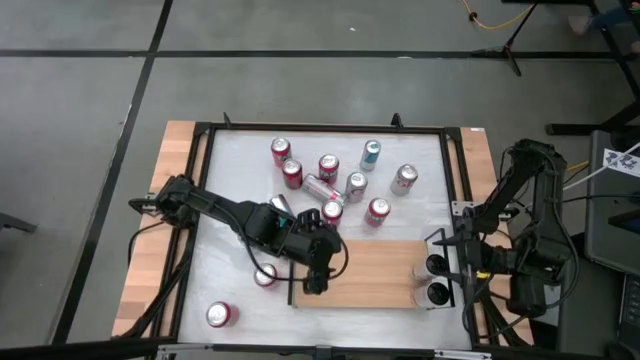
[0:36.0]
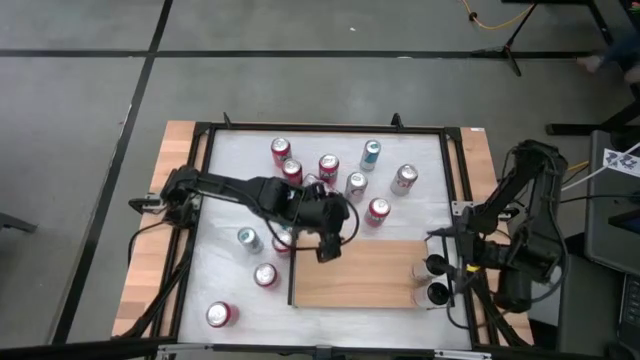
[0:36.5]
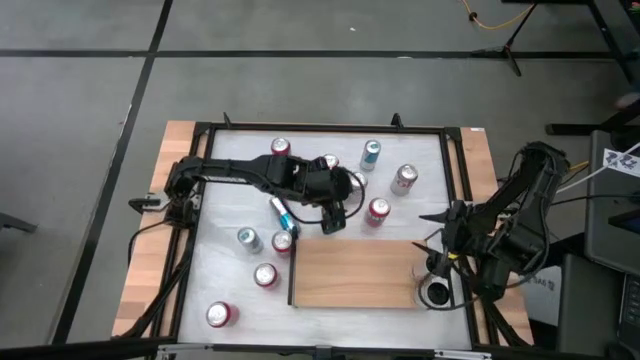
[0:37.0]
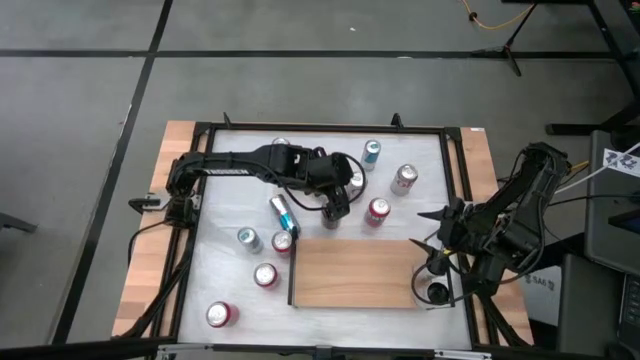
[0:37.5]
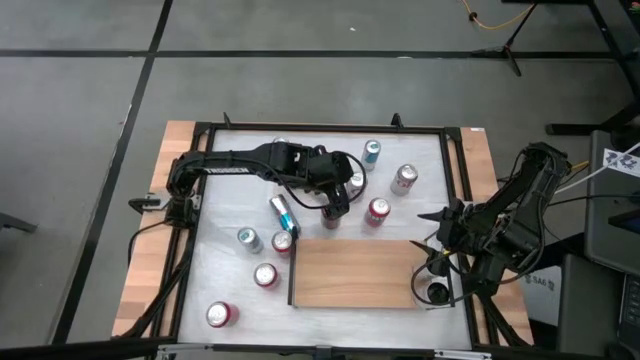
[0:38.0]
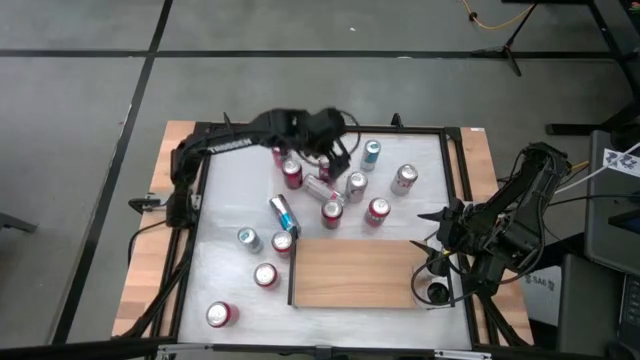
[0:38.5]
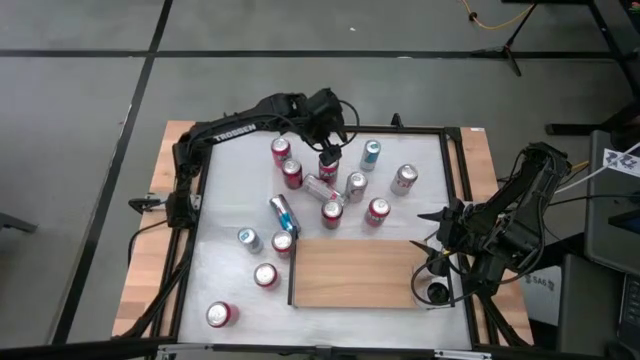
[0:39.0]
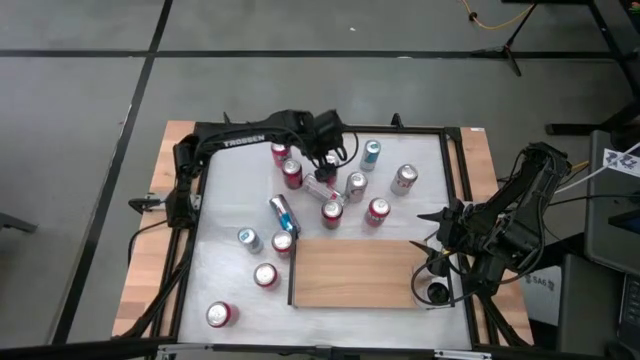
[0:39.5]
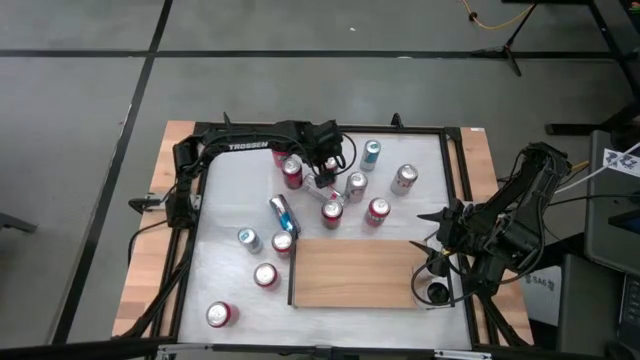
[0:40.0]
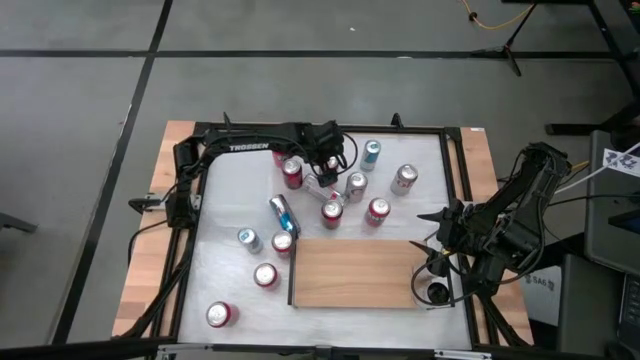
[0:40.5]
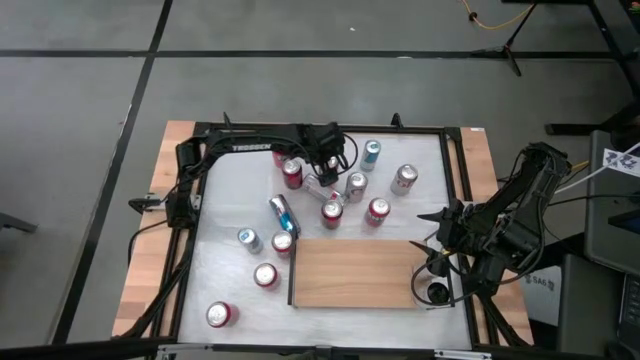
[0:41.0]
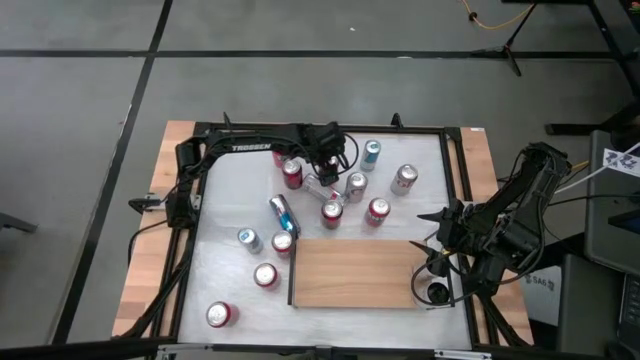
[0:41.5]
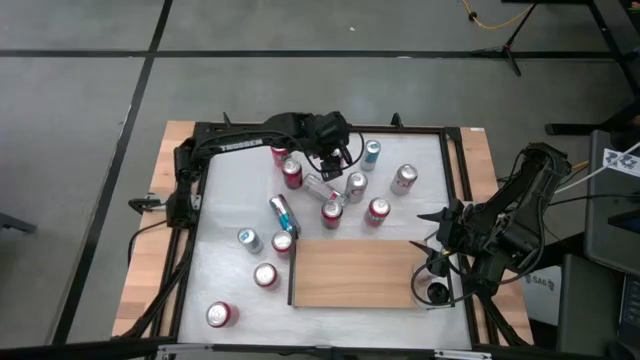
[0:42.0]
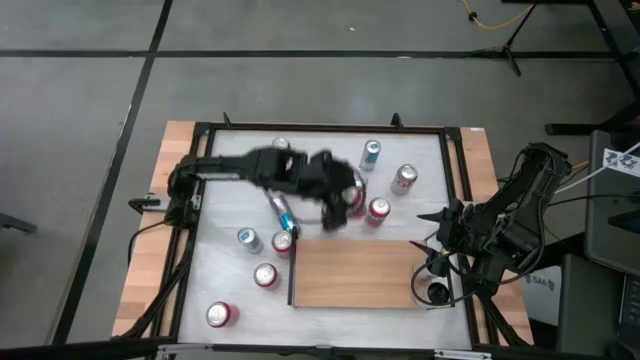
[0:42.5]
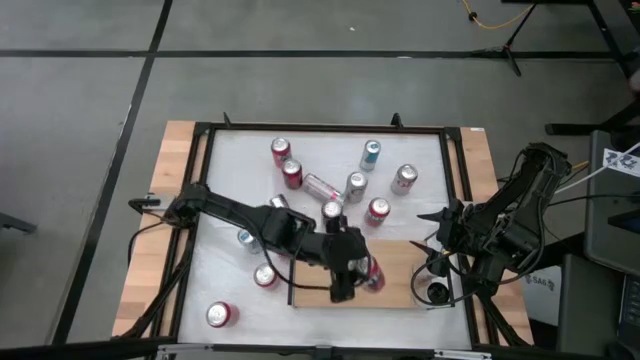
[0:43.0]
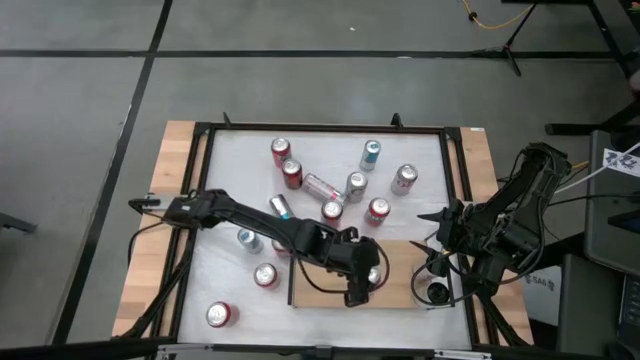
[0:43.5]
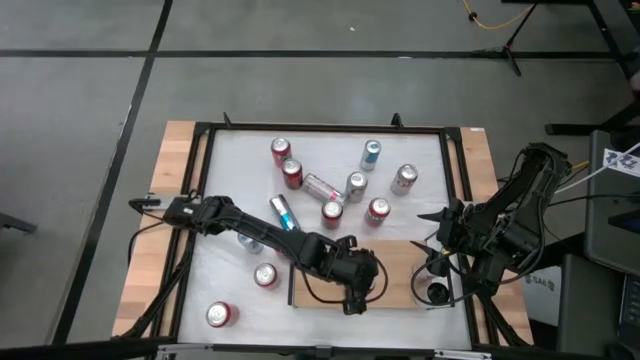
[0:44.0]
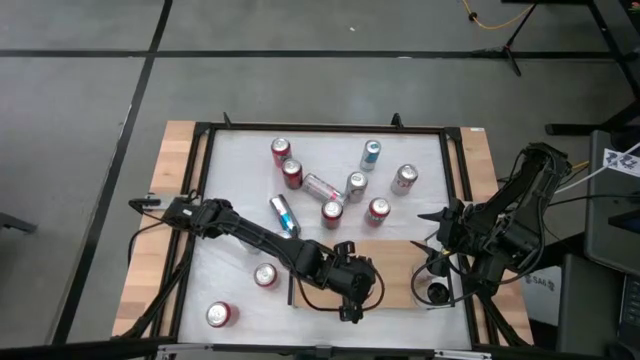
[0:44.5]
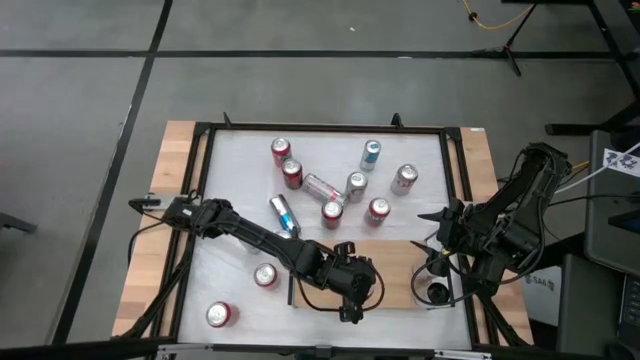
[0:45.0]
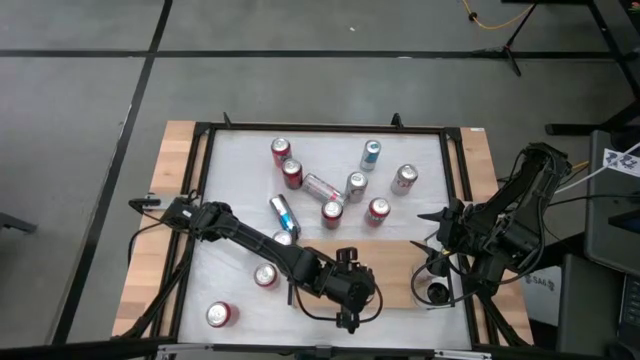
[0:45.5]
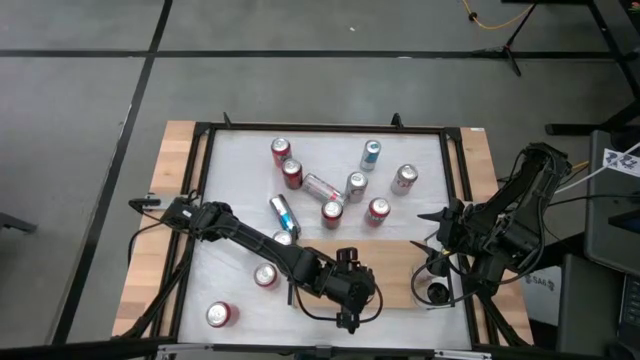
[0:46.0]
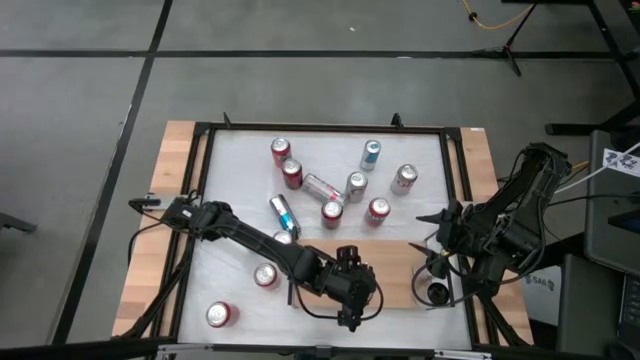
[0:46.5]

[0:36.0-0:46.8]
Task: Place canned beverage on shelf
Put the top right orange soda can on the shelf

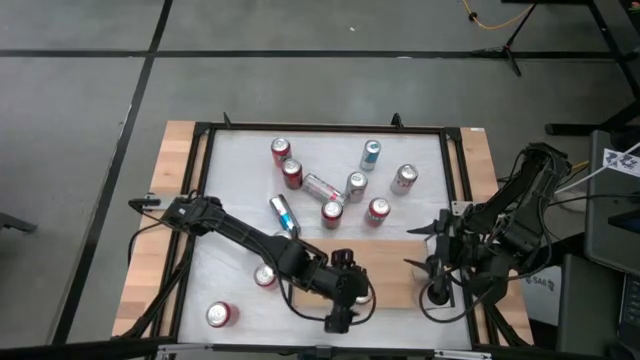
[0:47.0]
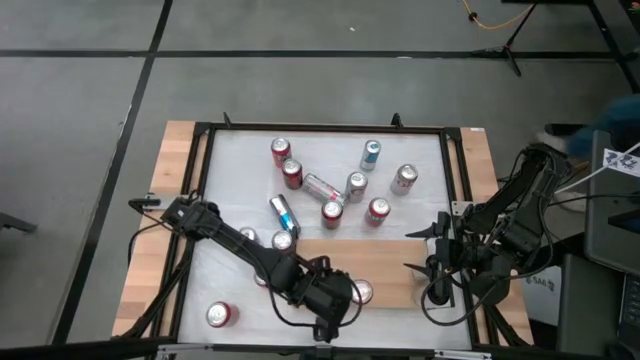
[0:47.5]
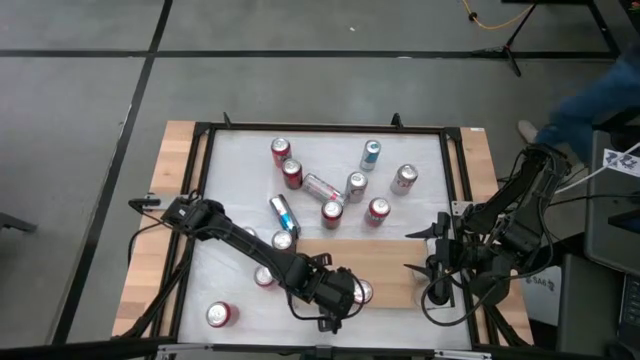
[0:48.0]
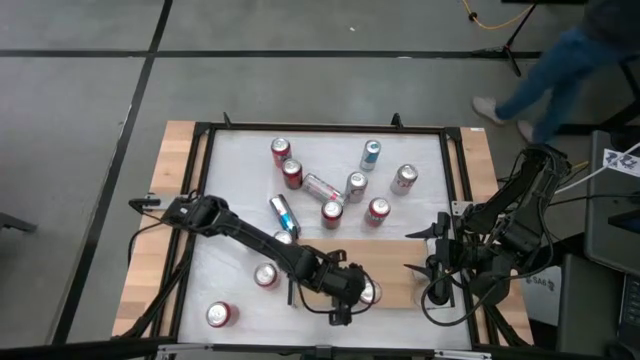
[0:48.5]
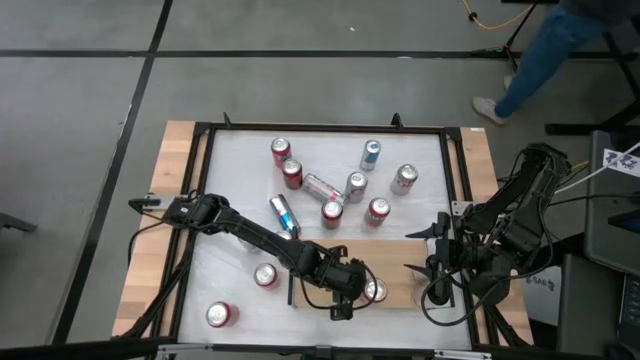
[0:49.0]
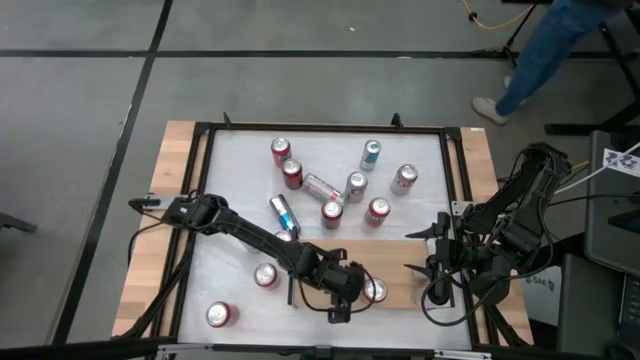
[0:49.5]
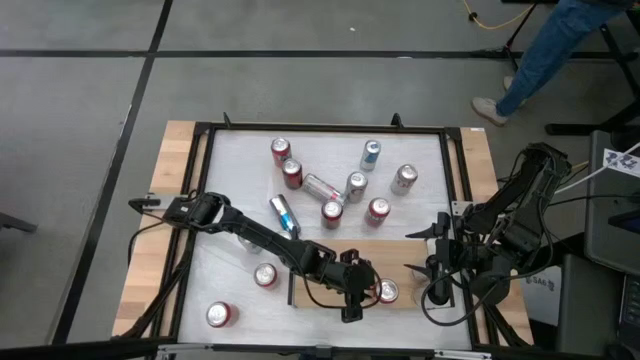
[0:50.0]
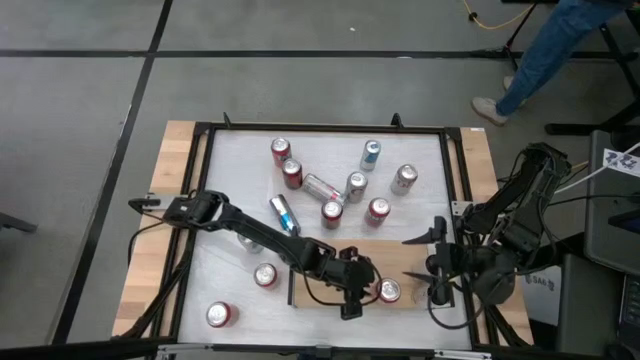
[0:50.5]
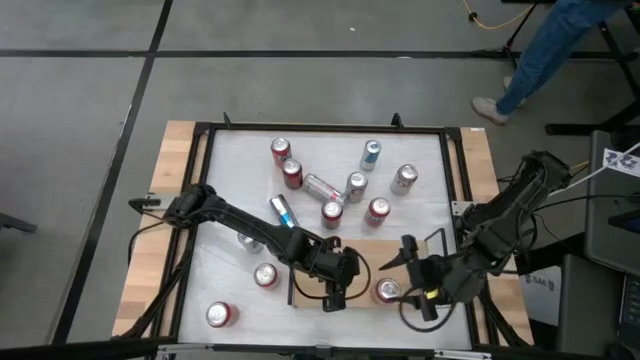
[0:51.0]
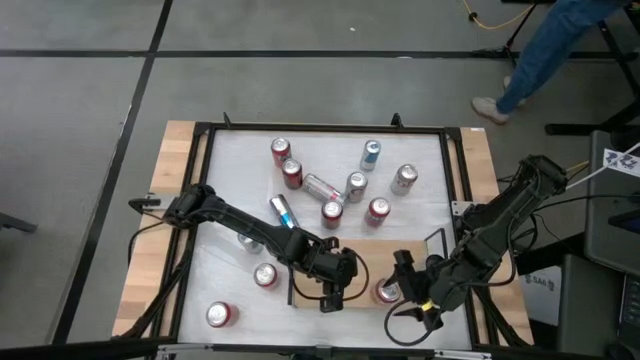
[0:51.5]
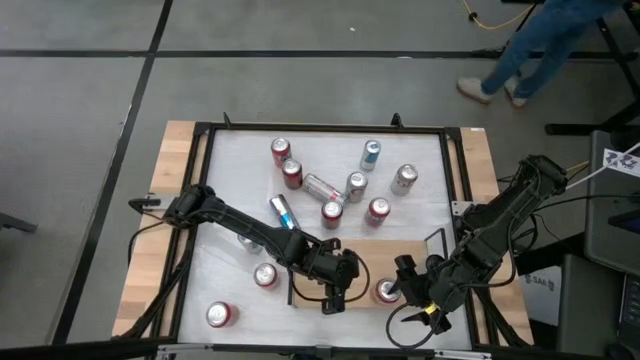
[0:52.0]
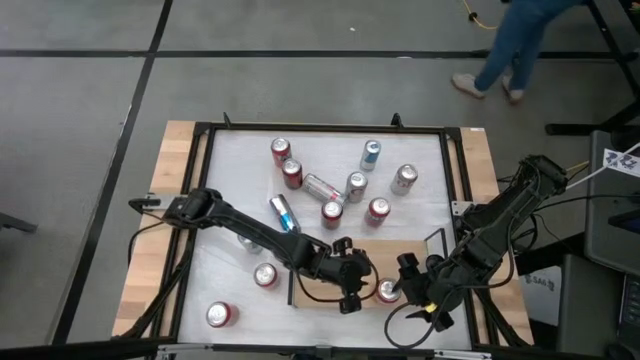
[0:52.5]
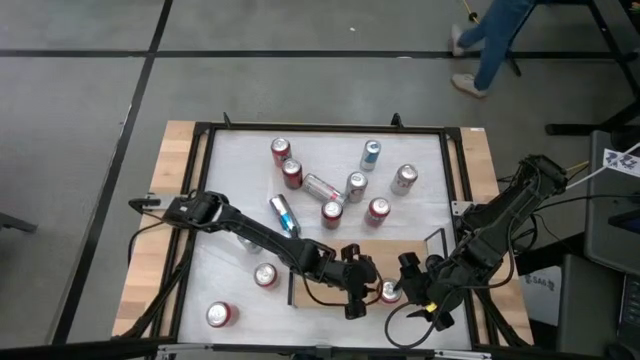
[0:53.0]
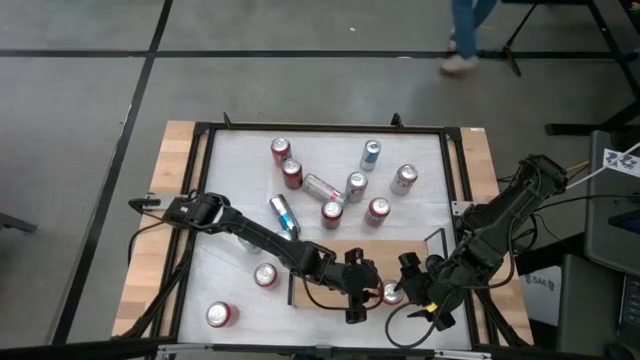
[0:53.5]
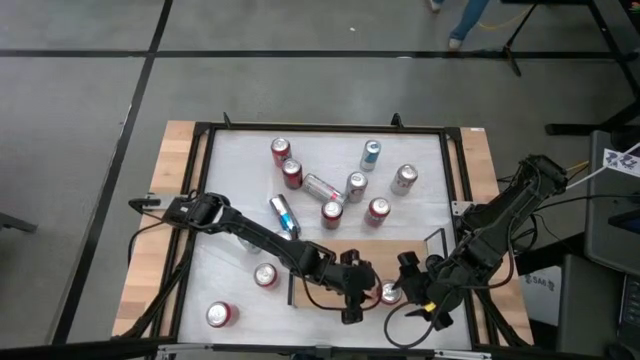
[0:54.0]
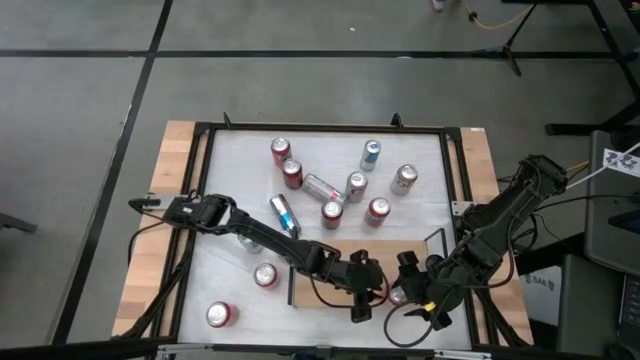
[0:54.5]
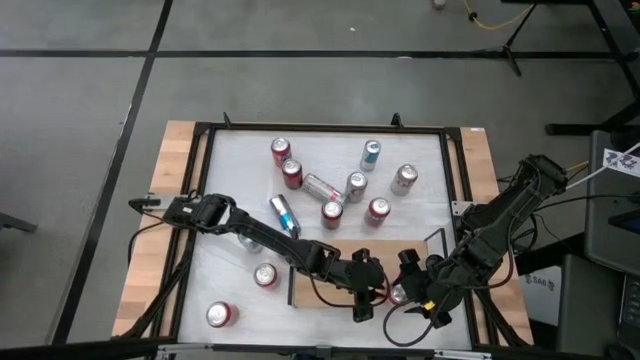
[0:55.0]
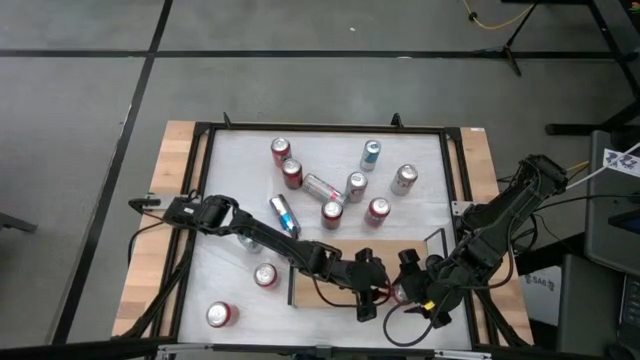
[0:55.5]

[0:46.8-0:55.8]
Adjust the orange soda can on the shelf

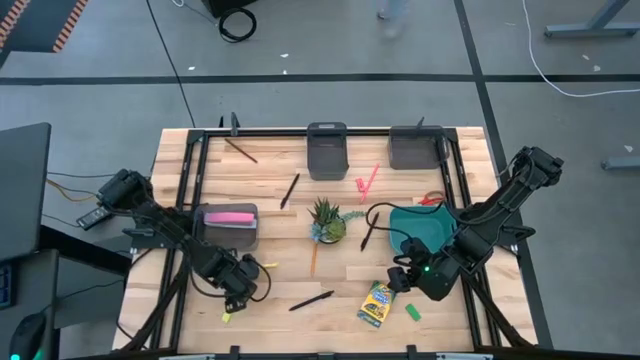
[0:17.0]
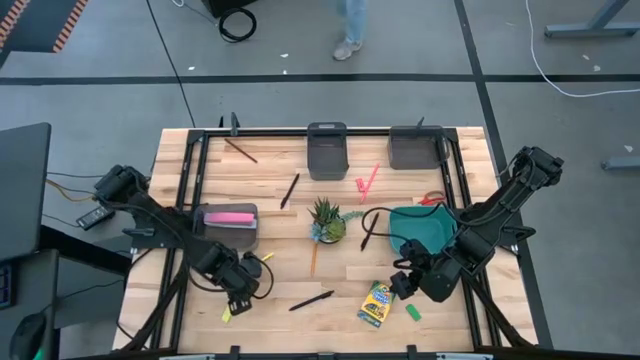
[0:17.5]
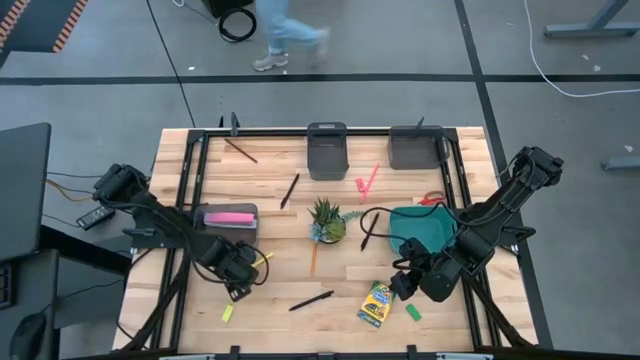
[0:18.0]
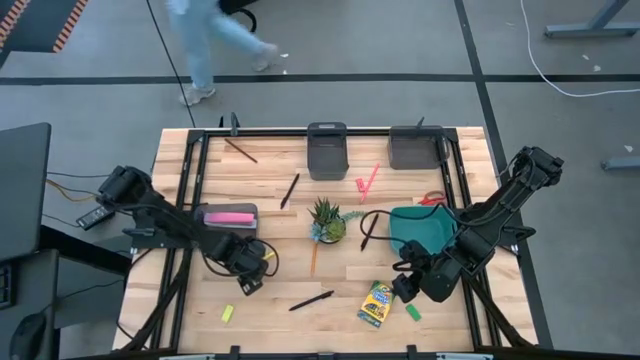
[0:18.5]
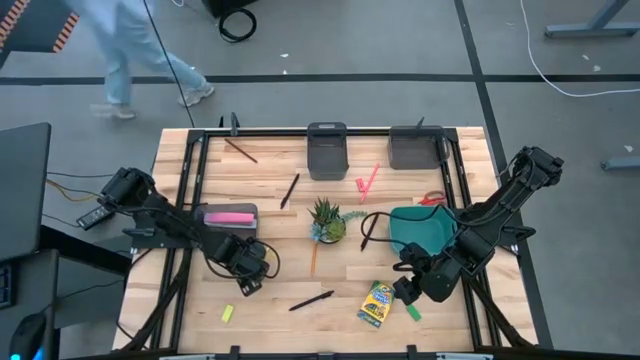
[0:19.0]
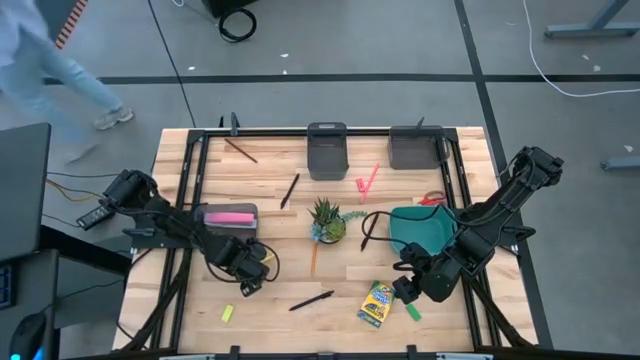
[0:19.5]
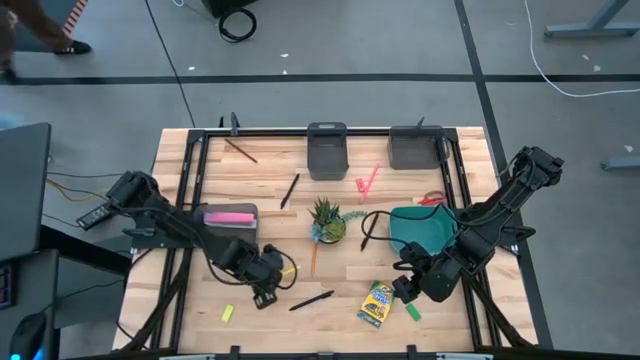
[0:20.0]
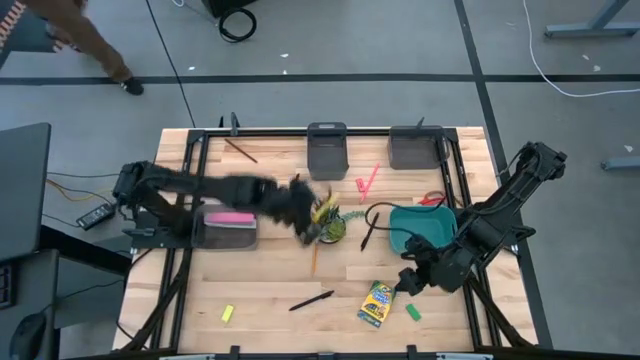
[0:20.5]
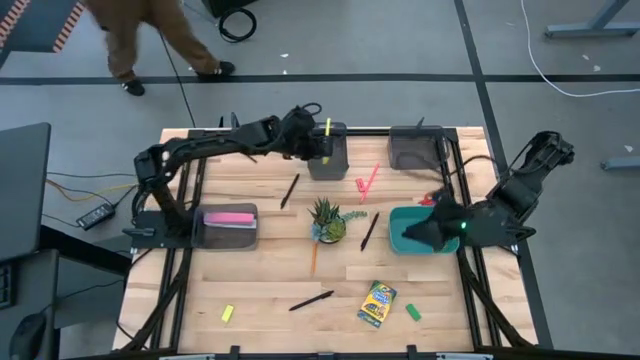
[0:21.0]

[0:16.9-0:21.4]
Task: Sort crayons/erasers/pens/pencils in bins
Put the yellow pen into the middle black bin
